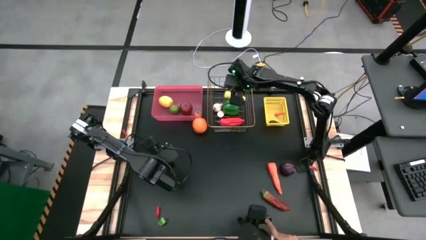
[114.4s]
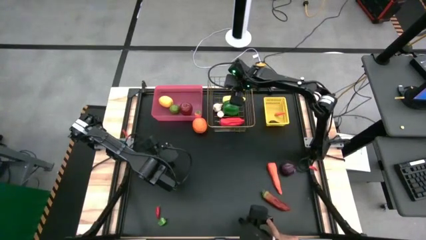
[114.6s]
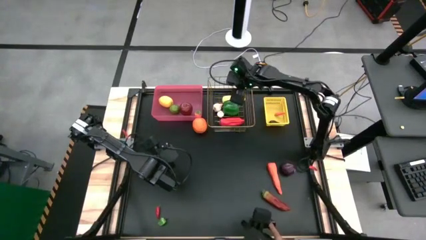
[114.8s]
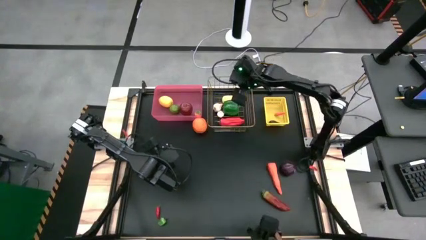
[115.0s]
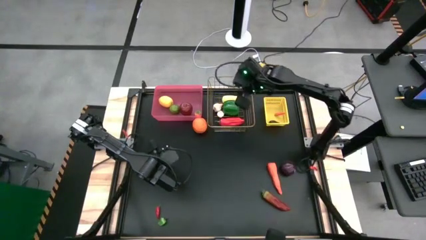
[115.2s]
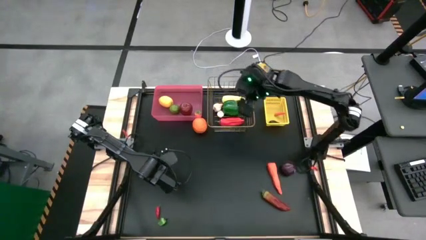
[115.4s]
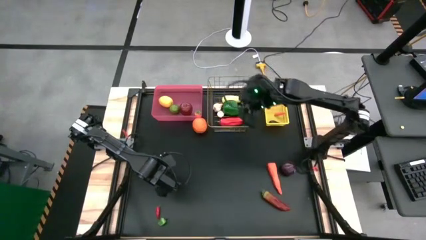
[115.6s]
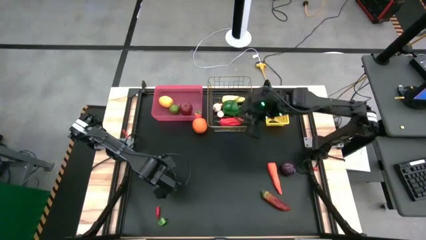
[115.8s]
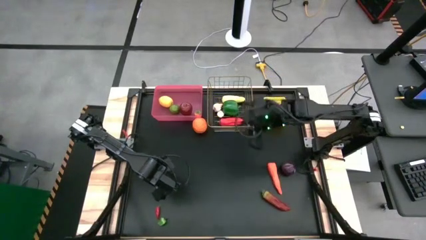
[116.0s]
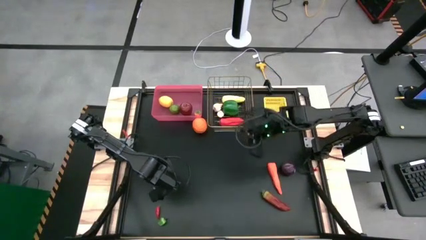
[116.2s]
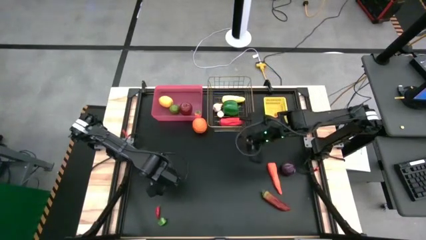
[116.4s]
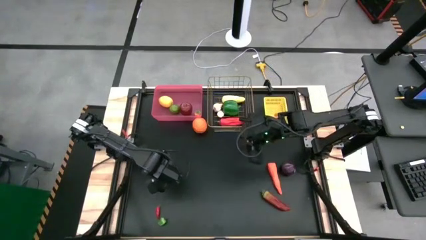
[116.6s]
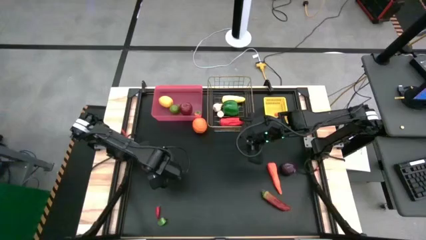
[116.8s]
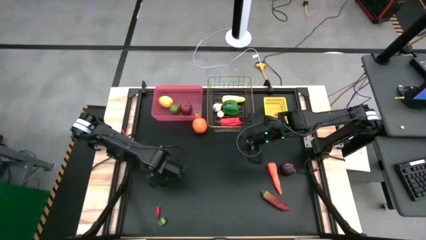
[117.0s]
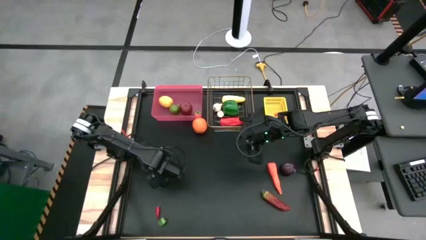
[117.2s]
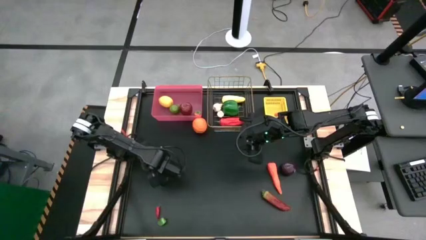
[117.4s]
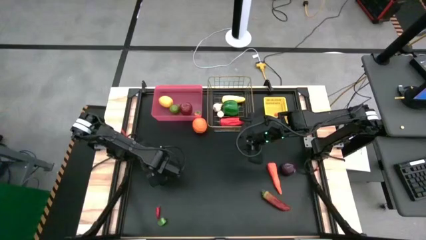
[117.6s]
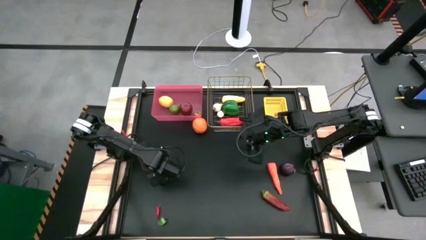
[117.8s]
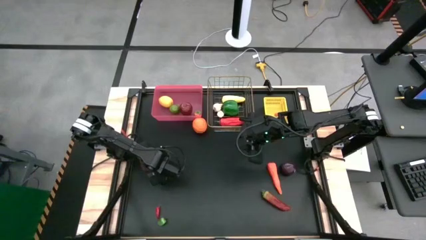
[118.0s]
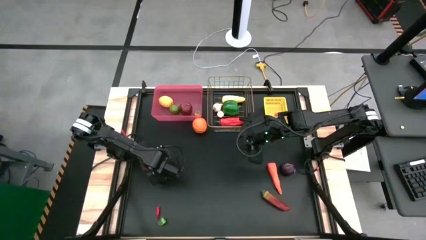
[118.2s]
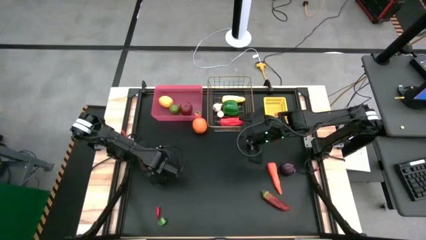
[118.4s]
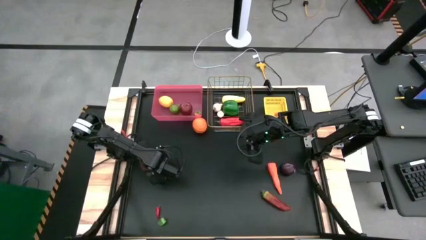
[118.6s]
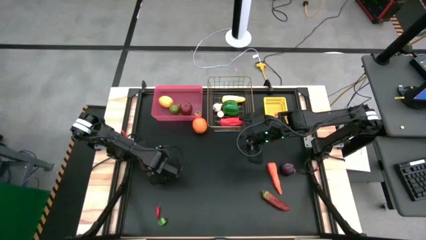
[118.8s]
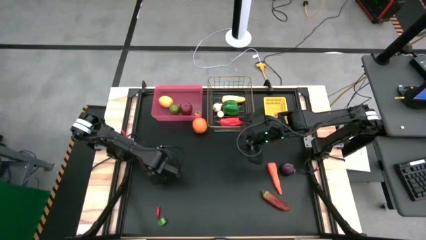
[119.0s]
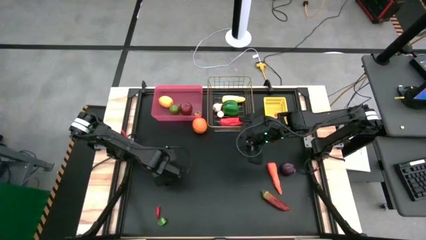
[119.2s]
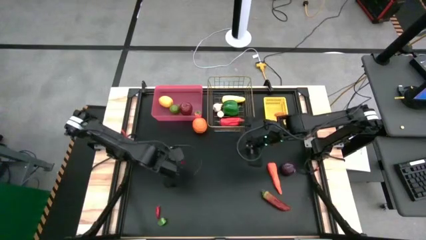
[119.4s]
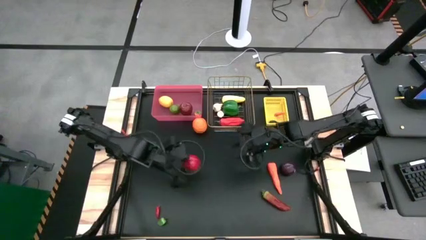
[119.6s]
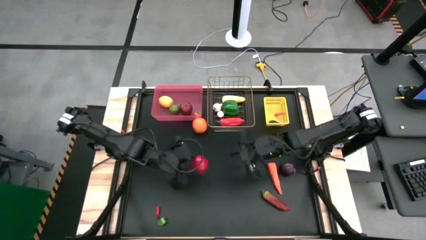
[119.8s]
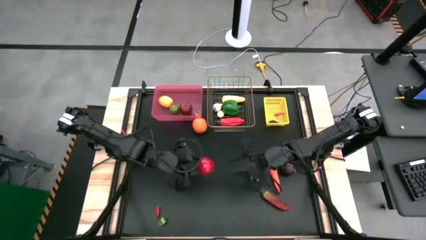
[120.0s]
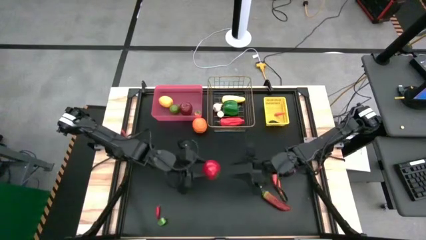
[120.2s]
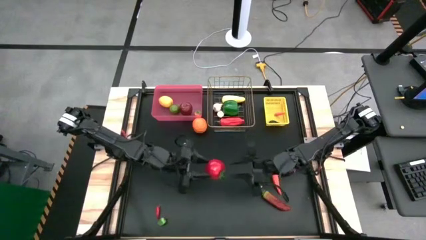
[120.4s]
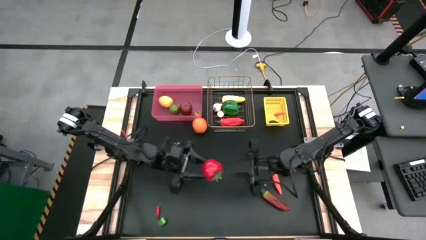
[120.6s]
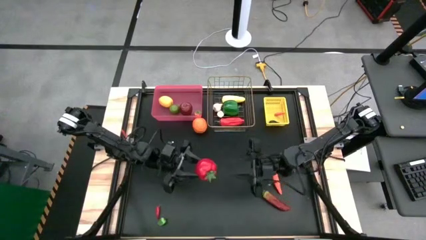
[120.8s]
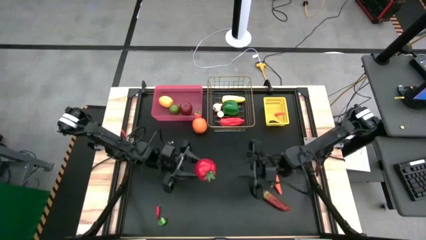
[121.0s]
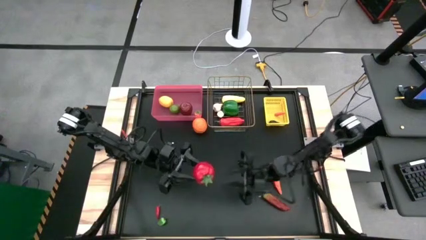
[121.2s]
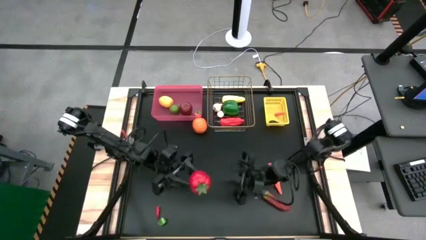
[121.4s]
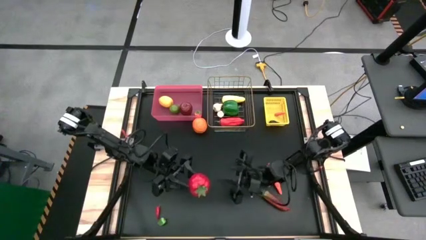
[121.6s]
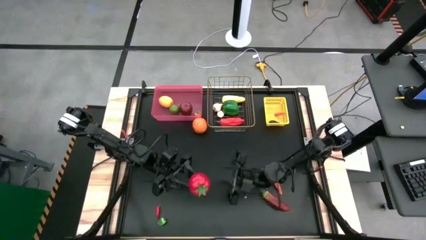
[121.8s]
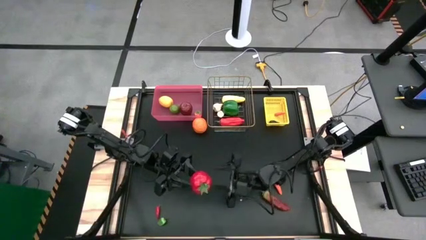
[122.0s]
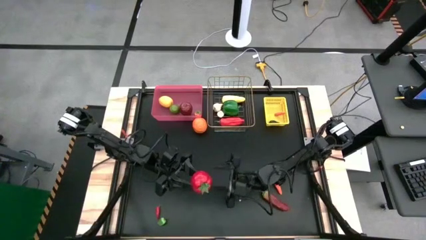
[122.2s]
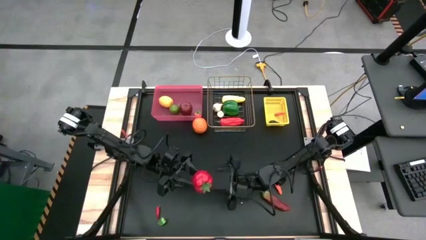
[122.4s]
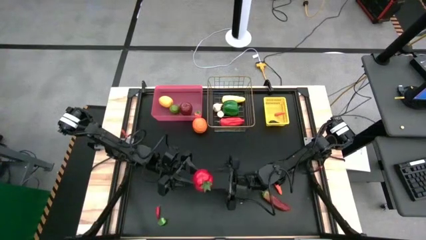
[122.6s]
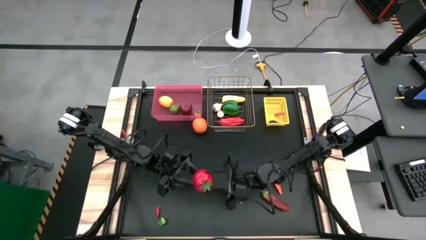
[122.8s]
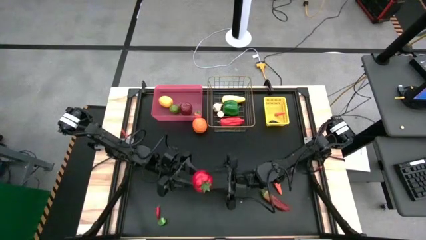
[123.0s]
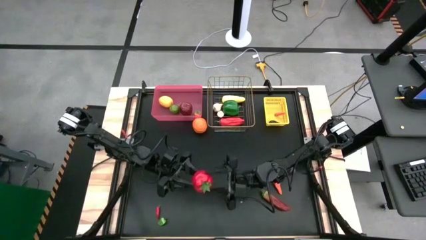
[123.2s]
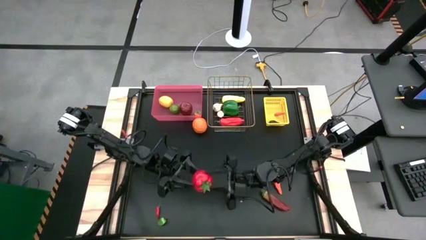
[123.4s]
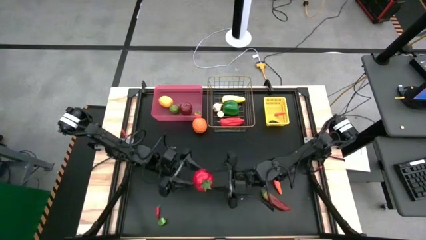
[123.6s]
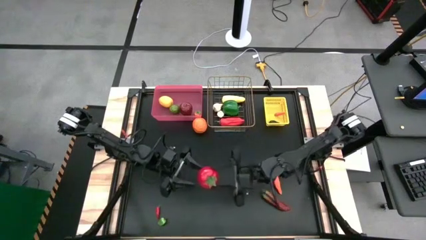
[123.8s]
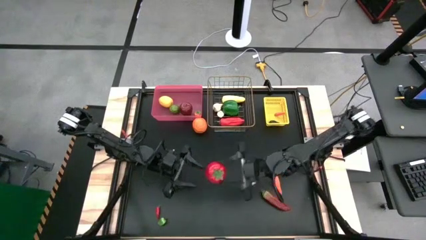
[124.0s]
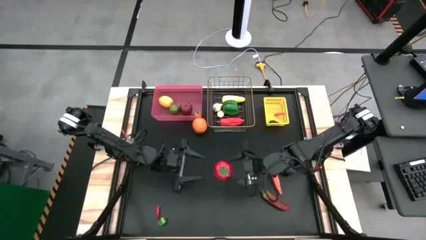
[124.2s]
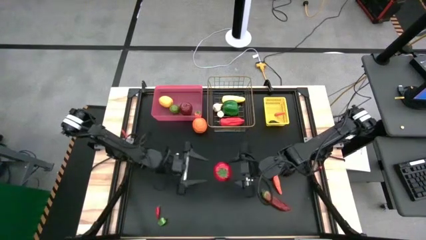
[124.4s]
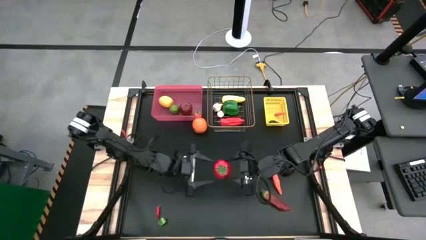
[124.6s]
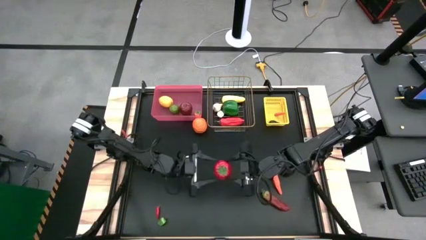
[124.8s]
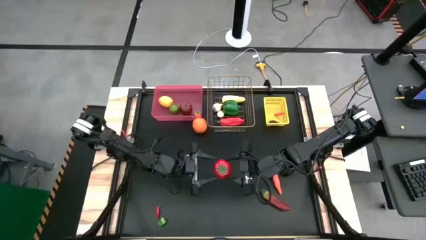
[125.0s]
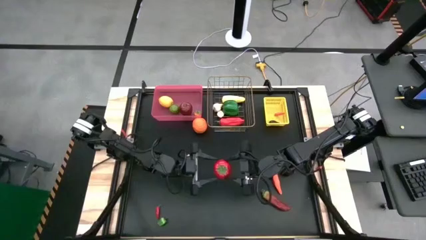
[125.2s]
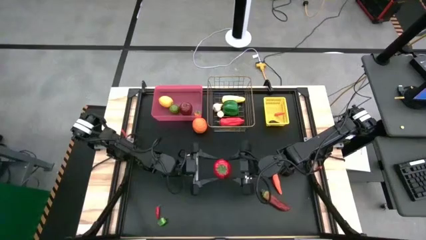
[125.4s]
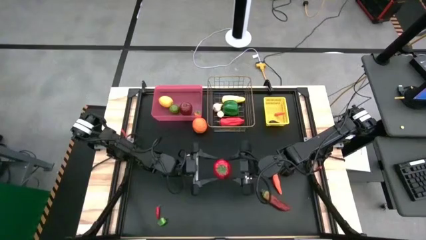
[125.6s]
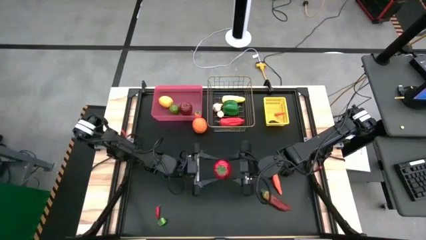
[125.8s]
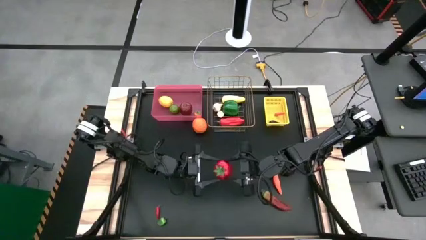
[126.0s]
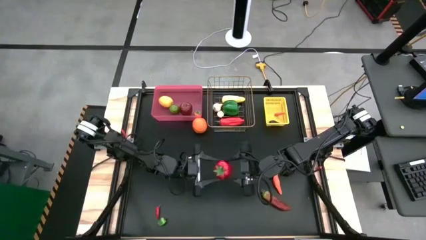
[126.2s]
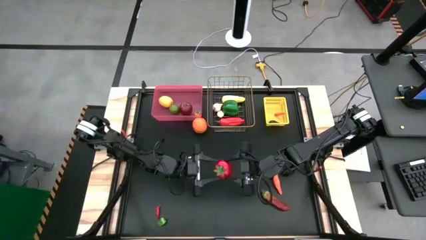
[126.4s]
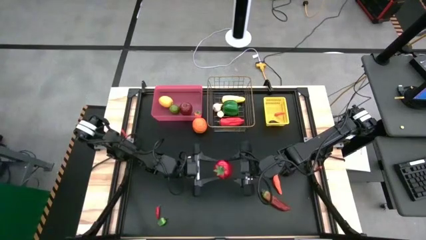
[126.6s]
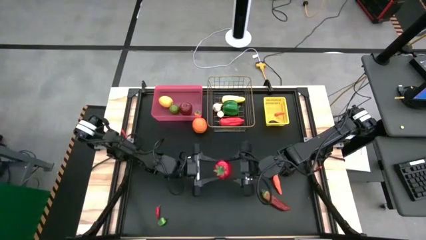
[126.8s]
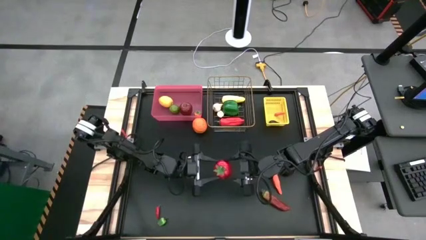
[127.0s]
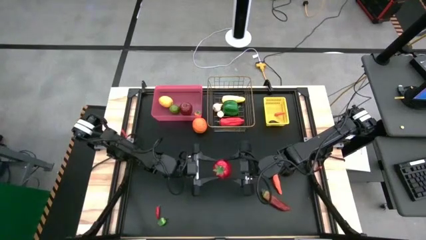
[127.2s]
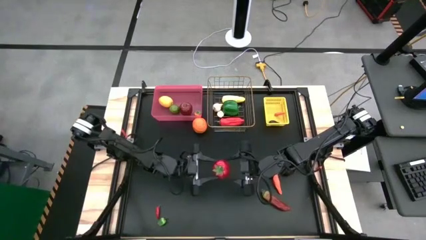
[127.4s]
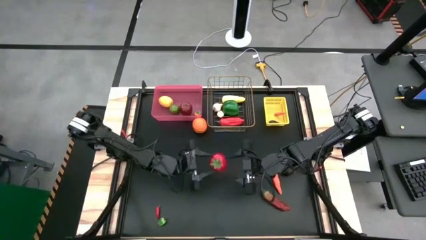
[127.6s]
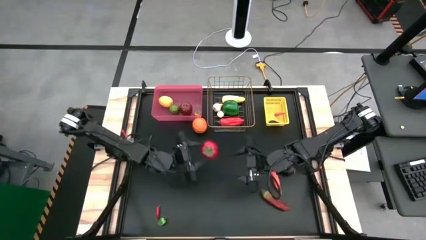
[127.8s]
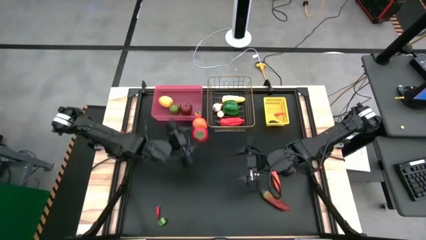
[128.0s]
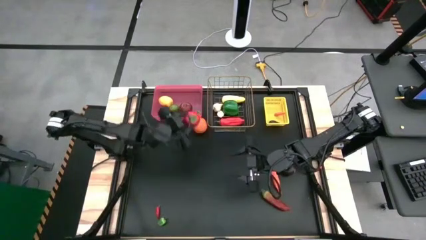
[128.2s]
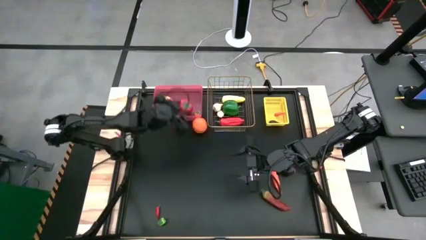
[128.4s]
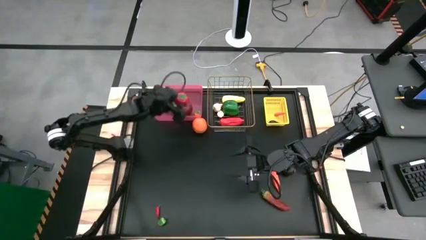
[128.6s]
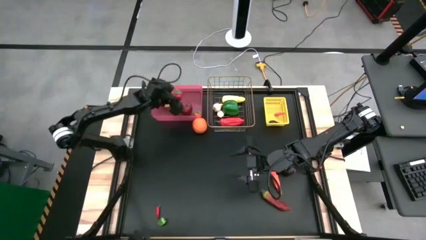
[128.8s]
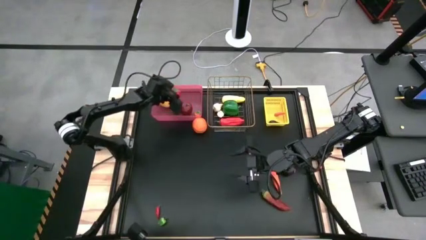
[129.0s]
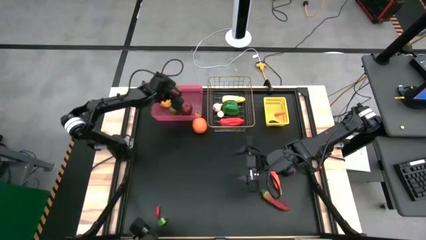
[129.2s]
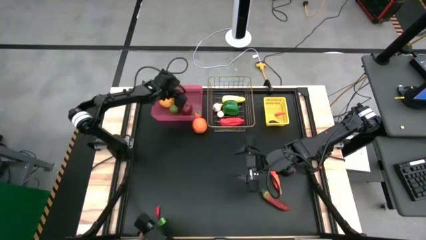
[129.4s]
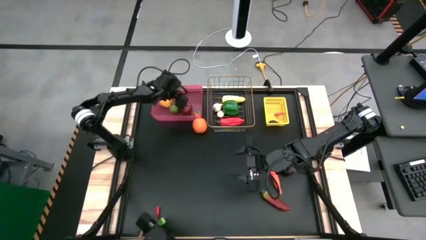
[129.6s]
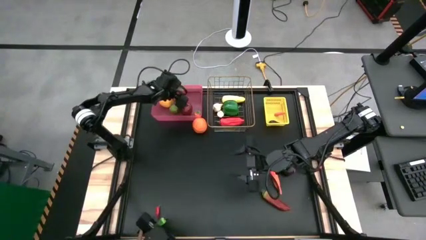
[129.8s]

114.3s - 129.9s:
Task: Sort produce into baskets
Put the red tomato into the red bin

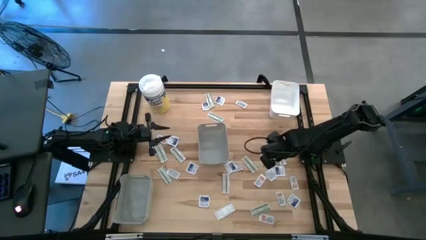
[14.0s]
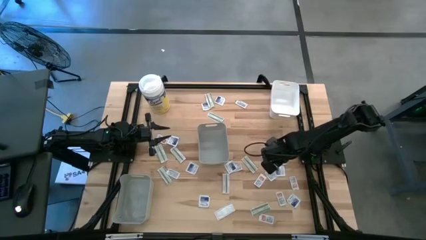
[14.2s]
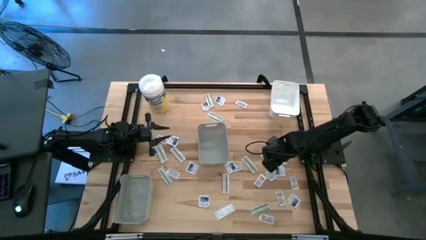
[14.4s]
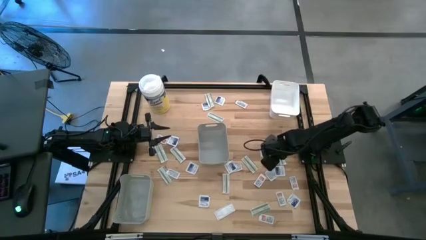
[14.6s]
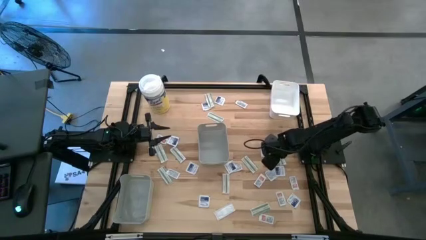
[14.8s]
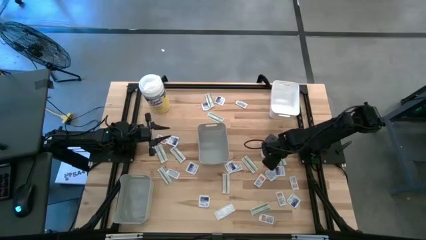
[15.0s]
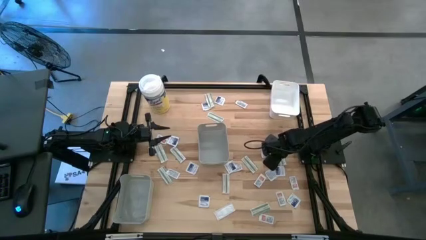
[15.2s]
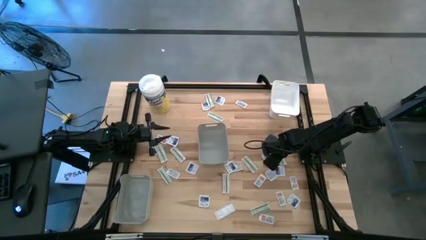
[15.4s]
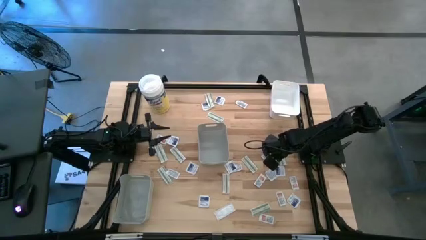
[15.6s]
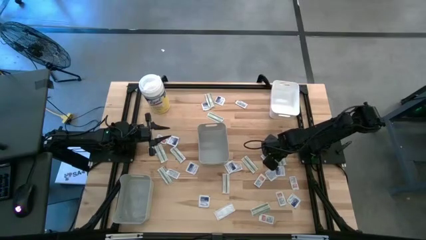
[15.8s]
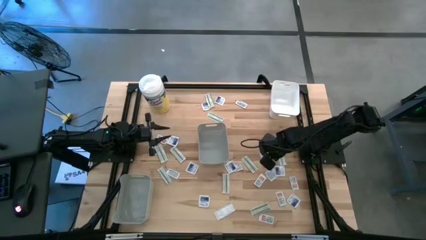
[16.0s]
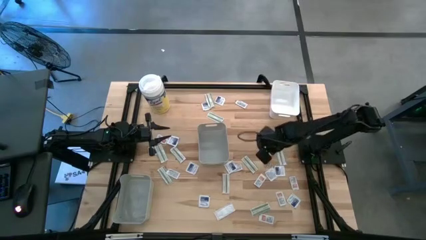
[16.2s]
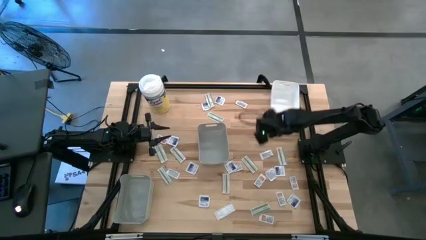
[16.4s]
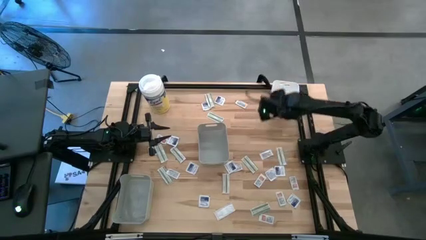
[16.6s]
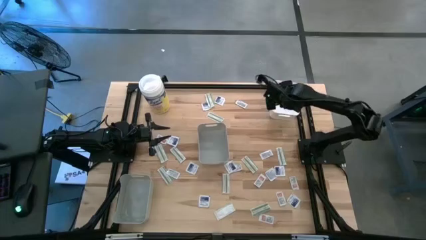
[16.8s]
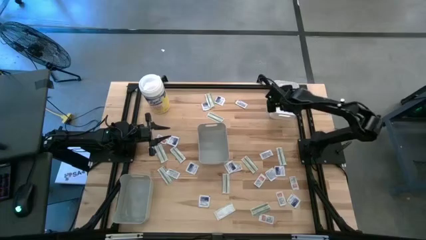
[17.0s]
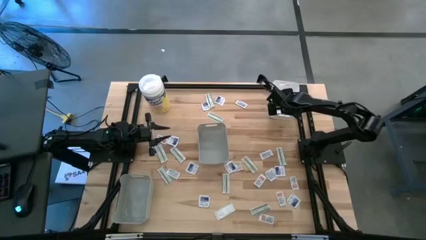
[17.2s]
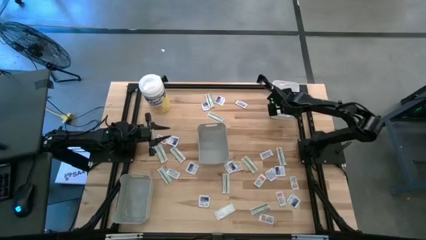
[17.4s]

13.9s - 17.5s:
Task: Pick & Place First Aid Supplies
Put the orange pad into the white bin
